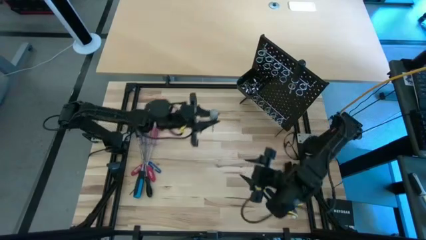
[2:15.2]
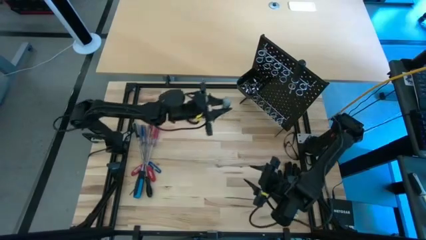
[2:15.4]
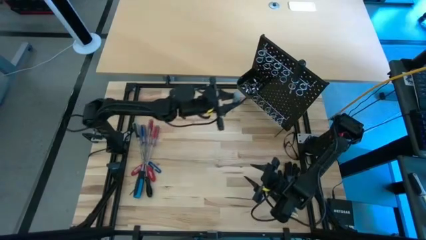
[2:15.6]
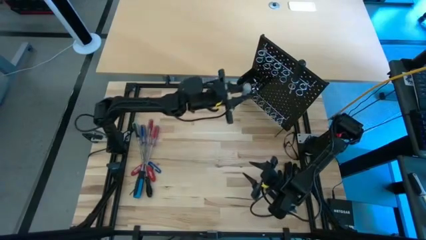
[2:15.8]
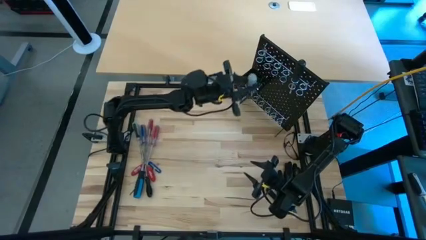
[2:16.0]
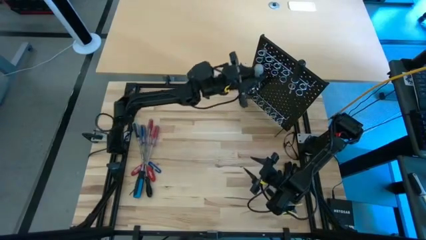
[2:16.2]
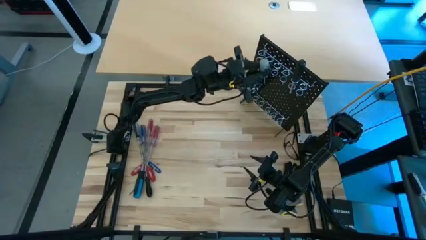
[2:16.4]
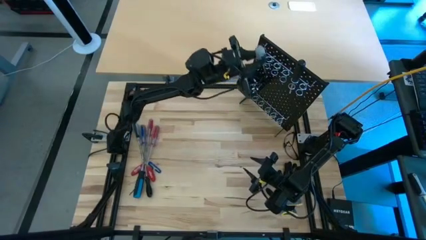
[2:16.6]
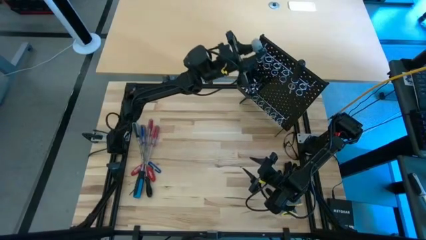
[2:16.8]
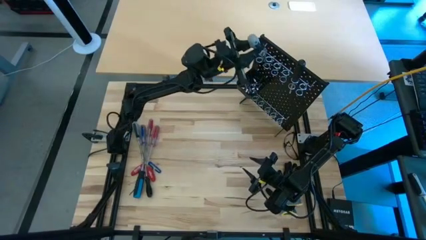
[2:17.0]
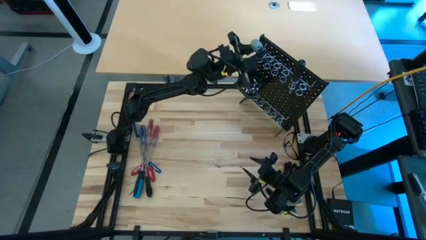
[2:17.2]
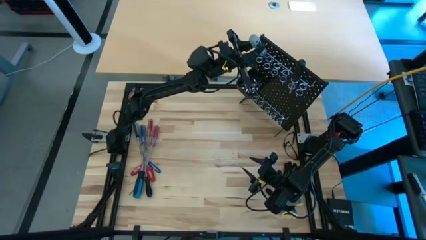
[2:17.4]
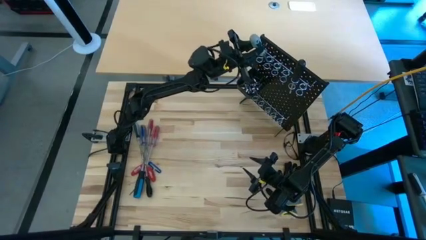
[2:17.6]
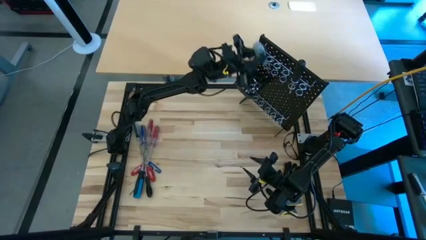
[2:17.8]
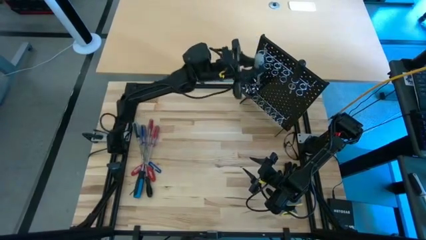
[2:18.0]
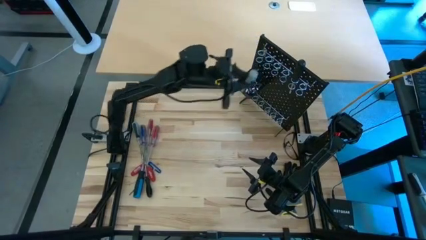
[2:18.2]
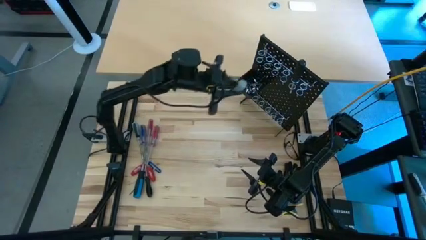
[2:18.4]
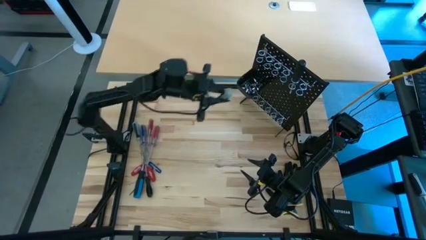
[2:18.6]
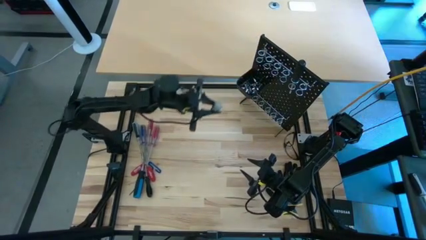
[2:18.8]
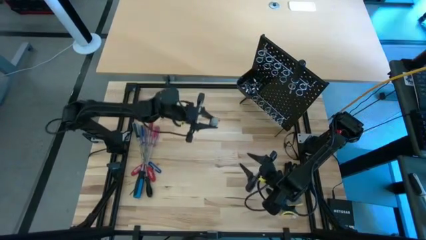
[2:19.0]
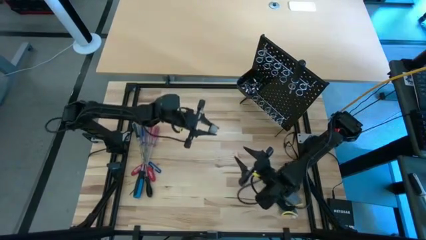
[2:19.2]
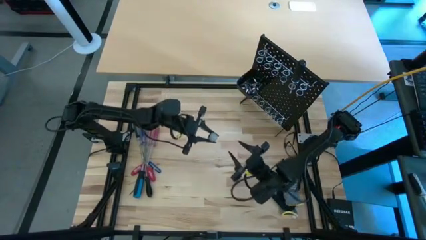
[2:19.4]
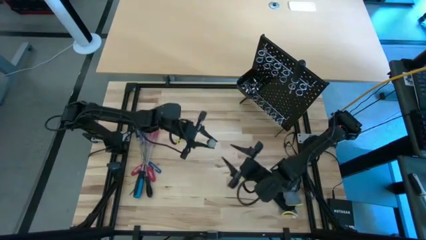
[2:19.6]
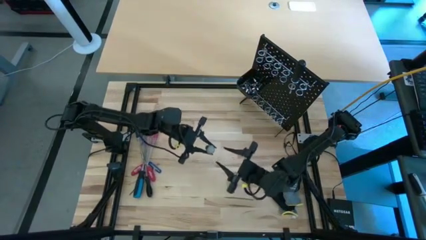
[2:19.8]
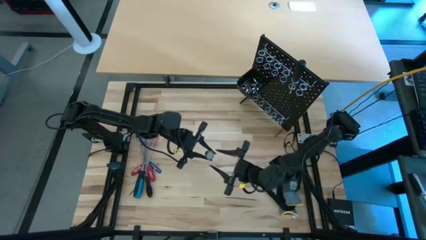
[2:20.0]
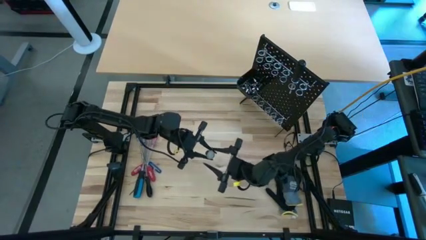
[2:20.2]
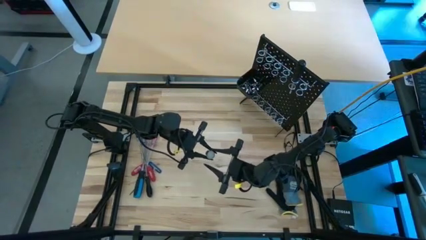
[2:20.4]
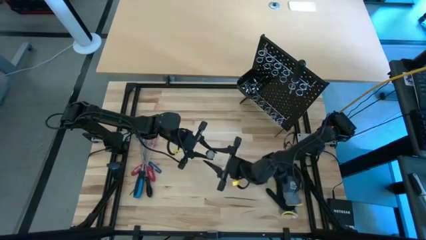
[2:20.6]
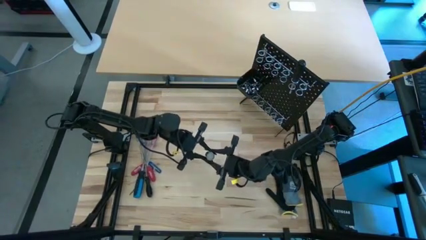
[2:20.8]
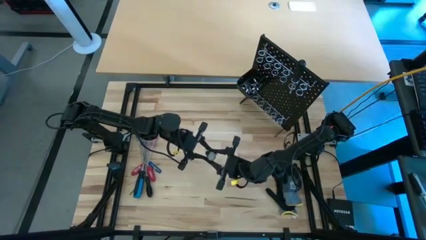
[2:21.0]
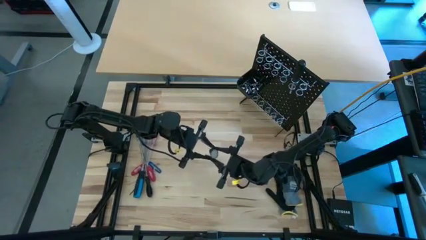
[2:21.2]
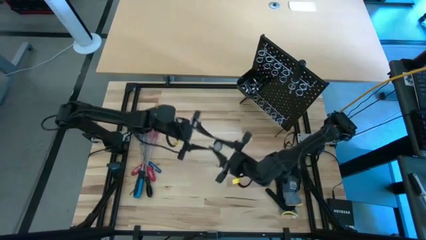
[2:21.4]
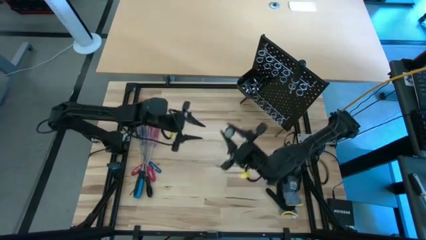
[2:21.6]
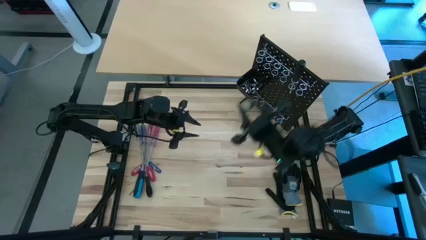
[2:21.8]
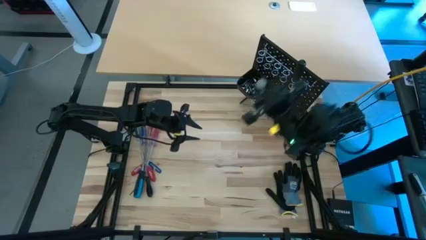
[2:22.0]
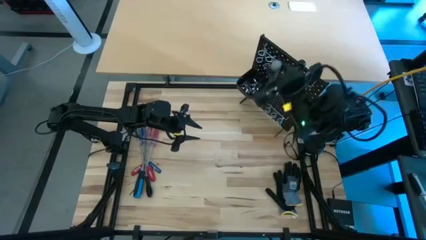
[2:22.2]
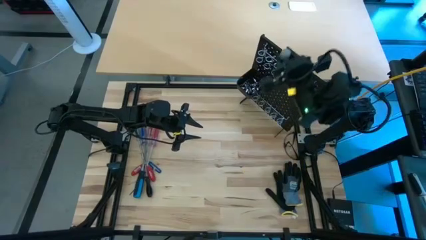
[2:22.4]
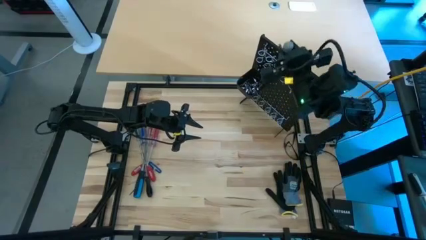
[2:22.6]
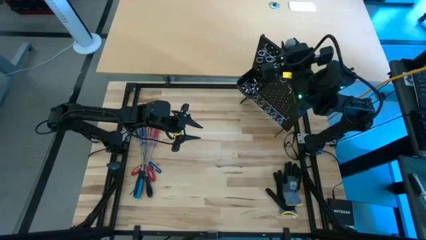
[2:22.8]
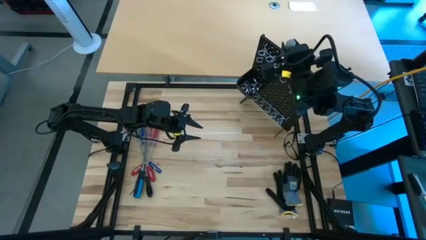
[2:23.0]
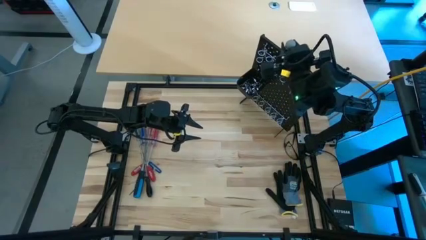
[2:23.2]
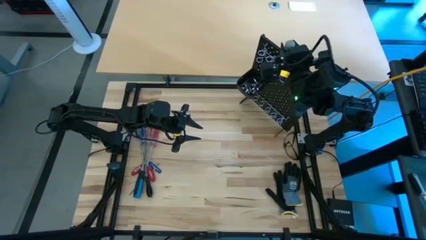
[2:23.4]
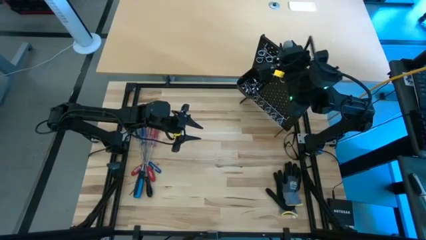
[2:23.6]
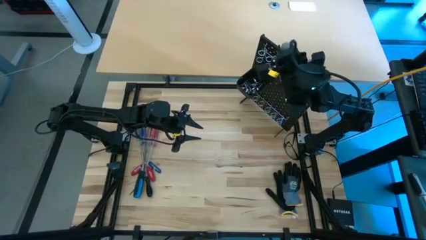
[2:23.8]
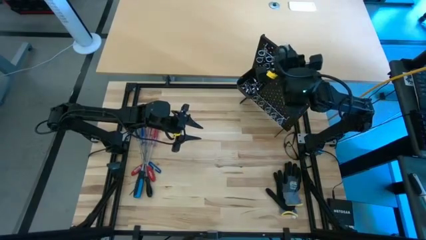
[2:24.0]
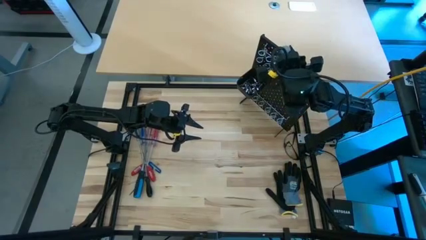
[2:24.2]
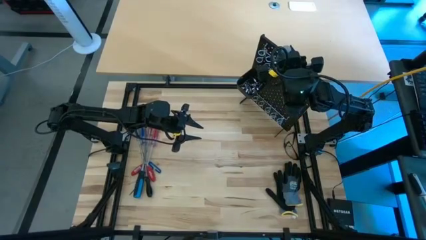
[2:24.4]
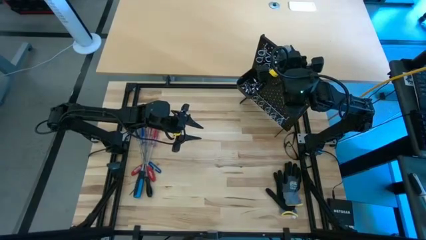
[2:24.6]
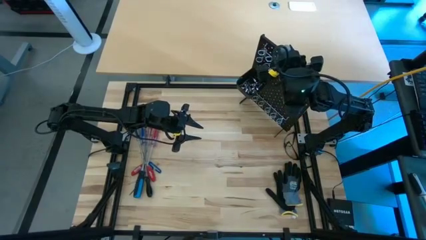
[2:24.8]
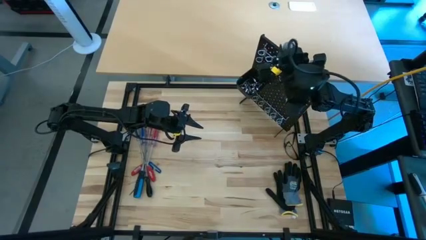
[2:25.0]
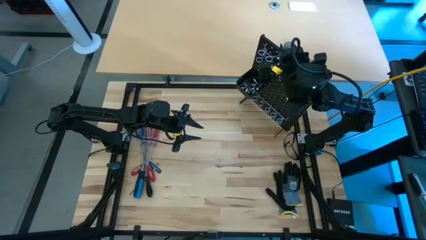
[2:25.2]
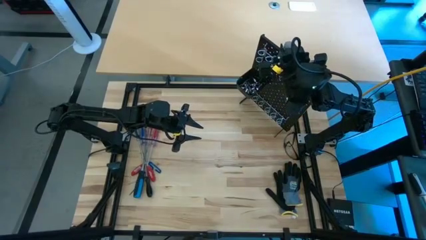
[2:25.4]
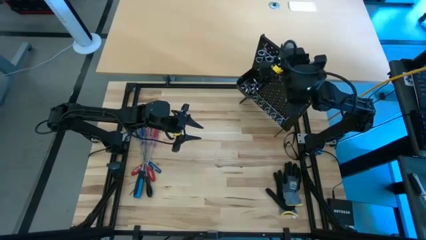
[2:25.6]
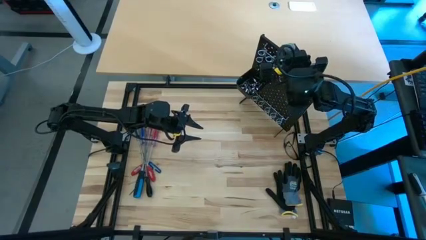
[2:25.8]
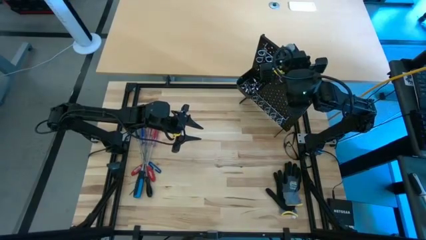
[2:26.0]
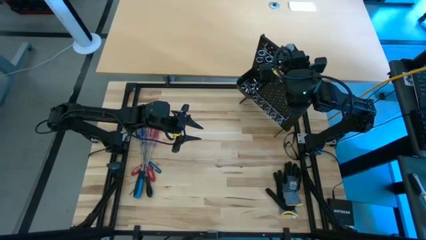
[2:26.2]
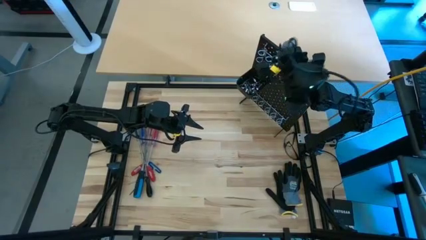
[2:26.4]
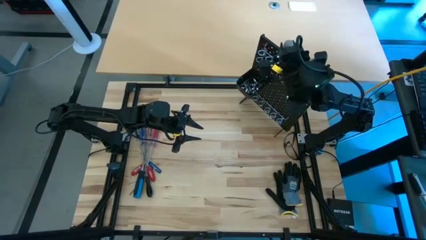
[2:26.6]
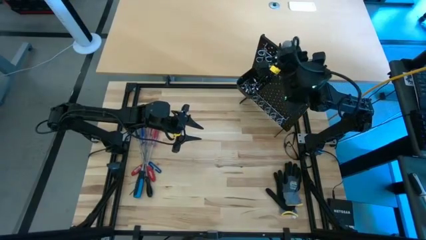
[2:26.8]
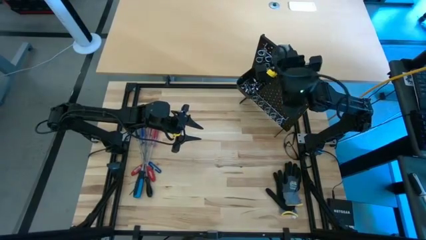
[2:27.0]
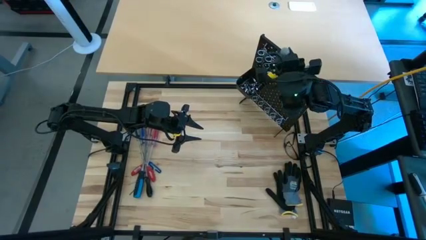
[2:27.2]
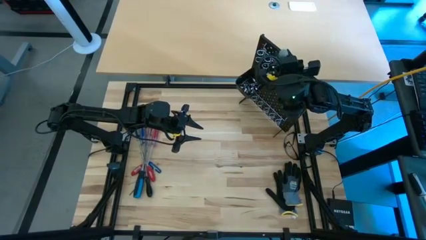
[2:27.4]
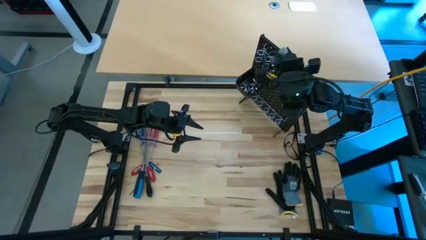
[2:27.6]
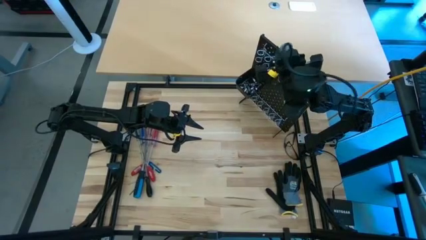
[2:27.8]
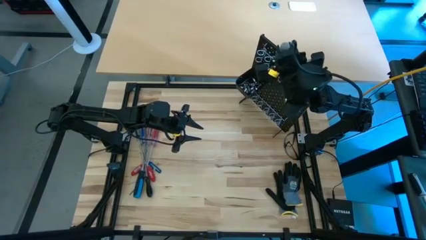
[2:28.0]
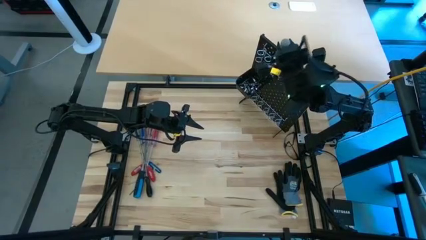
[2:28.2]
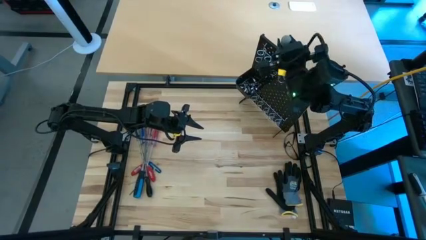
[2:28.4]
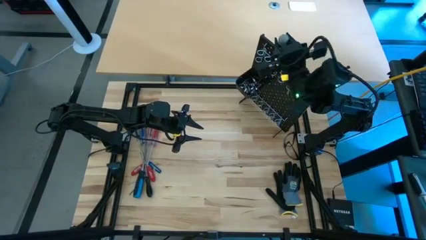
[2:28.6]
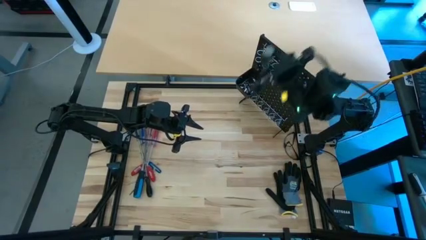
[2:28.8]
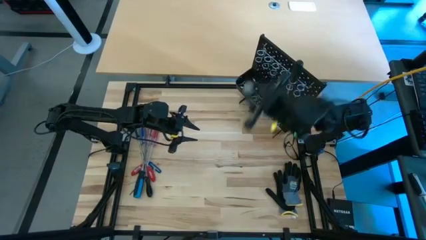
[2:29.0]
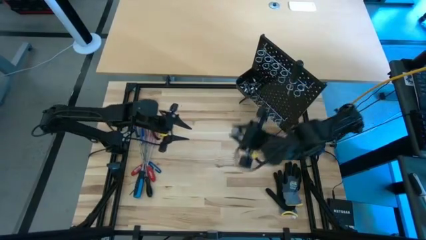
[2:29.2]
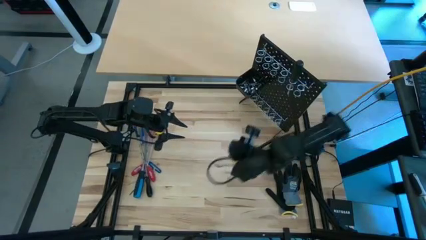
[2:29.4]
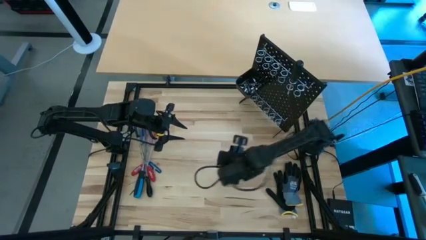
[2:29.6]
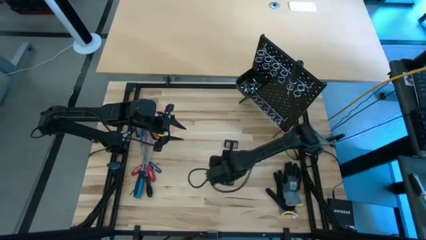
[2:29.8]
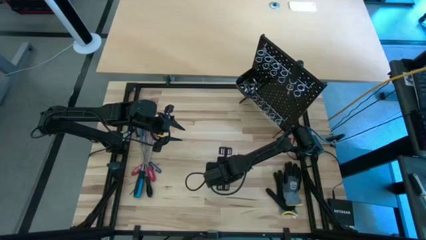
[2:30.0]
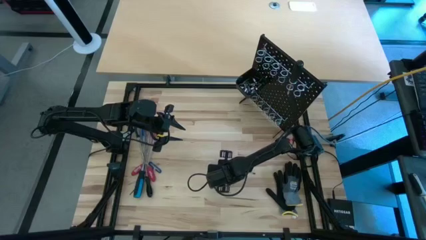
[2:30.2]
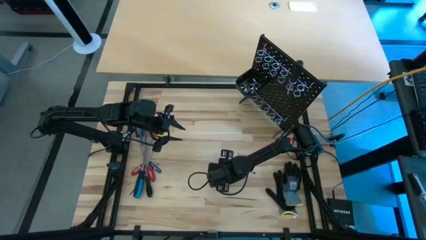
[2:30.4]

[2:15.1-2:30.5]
Task: Hang tools onto peg board
Hang the right gray screwdriver on the black pegboard
